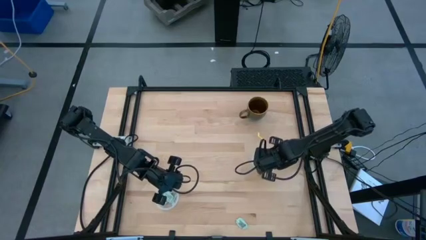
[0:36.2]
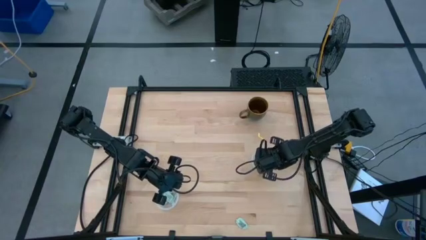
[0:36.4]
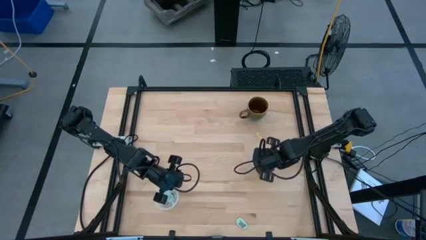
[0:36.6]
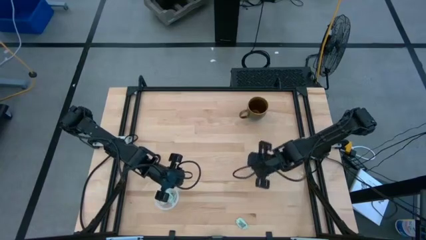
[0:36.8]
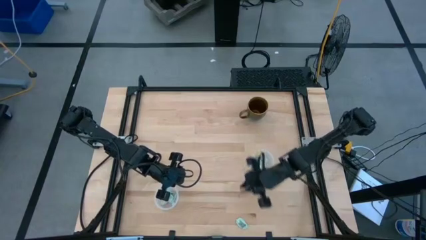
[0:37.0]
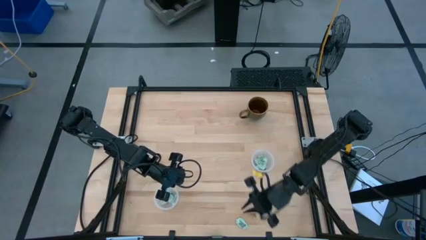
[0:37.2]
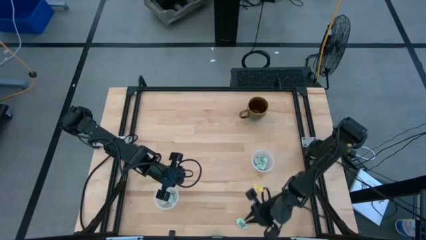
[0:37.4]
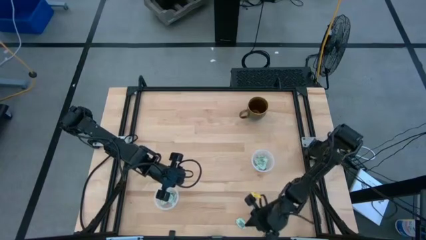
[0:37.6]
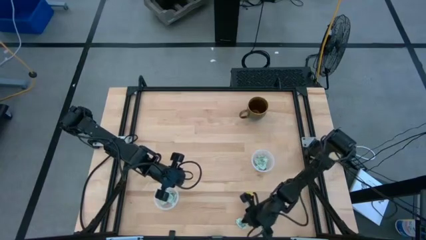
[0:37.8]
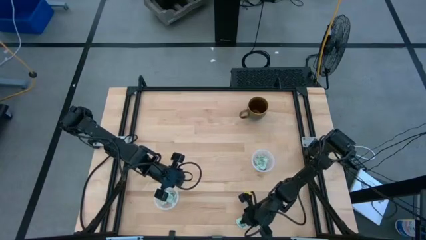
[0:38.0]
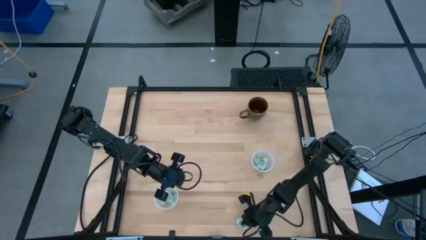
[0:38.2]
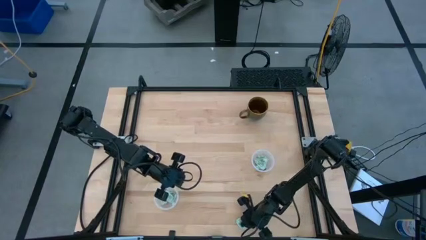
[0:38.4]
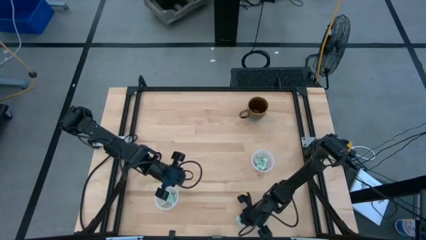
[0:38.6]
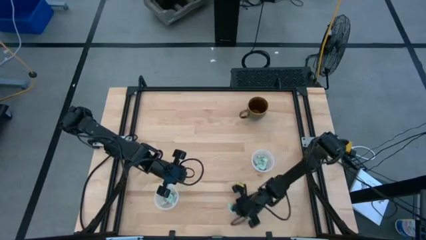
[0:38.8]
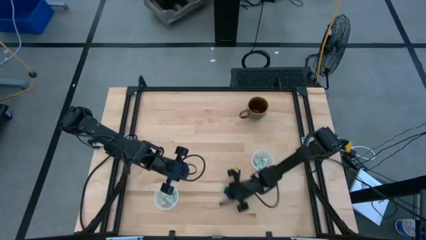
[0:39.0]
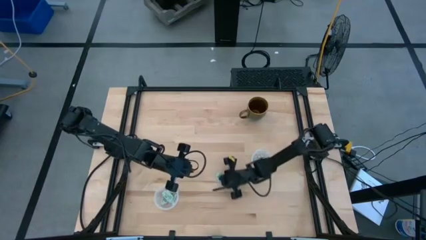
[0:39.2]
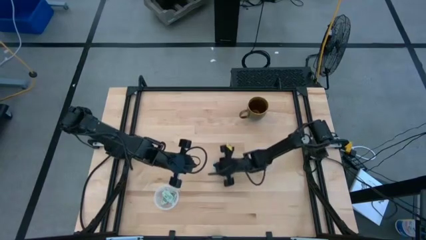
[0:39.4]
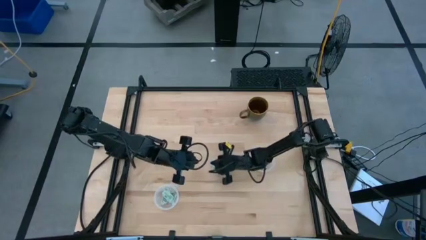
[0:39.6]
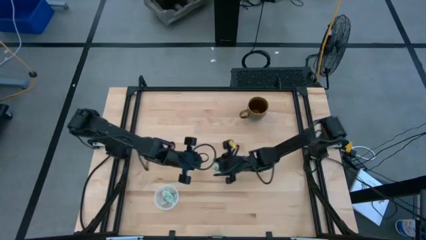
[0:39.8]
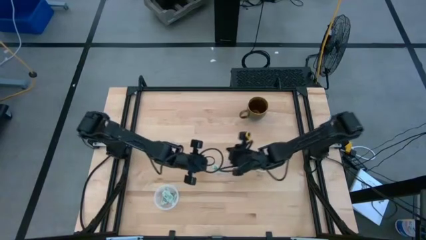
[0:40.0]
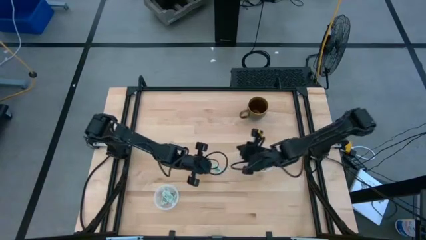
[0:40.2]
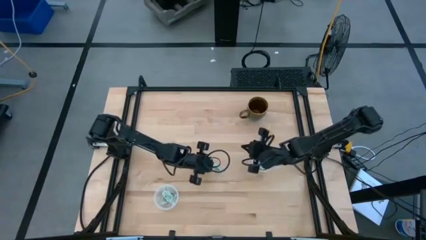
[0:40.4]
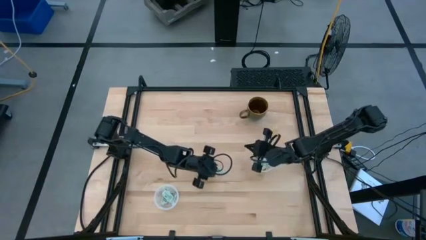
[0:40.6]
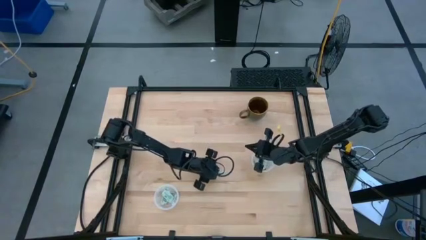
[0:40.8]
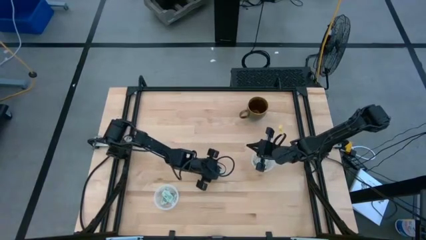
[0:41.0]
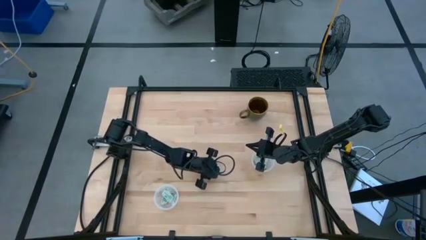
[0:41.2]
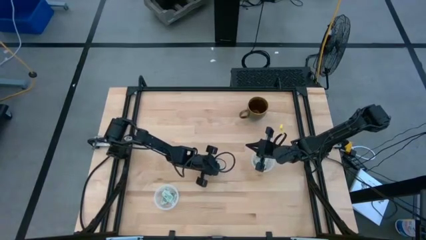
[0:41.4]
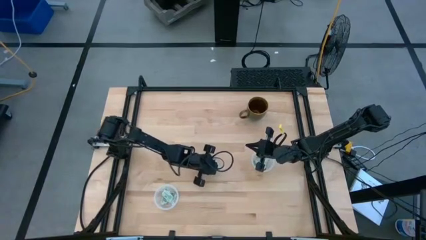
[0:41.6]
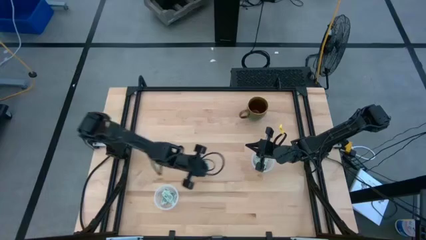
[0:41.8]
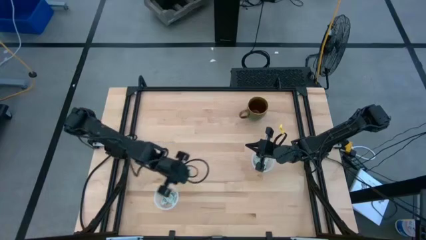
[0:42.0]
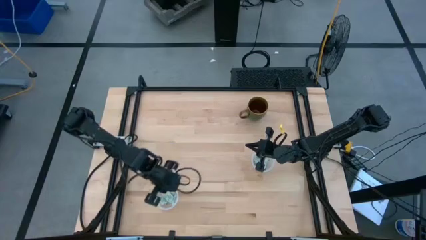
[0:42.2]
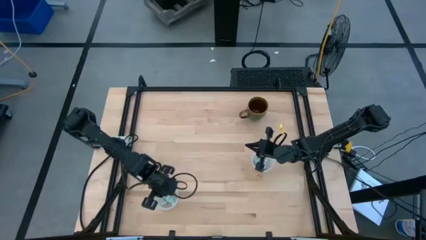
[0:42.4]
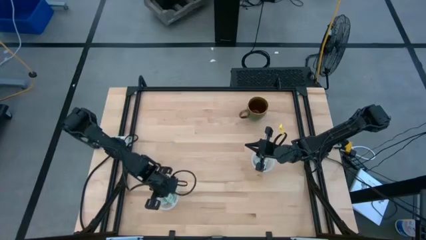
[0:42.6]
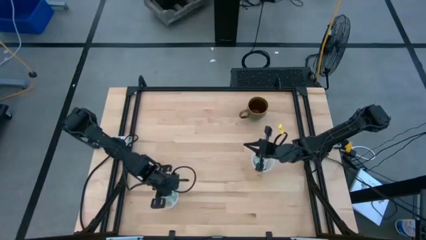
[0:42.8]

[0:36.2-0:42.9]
Task: Pick and place Stevia / Truvia into bins
Put the stevia packet into the bottom transparent container

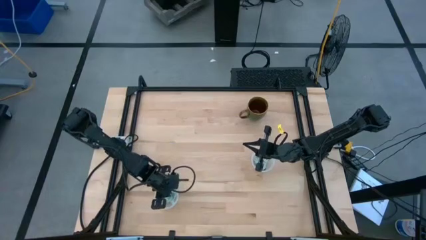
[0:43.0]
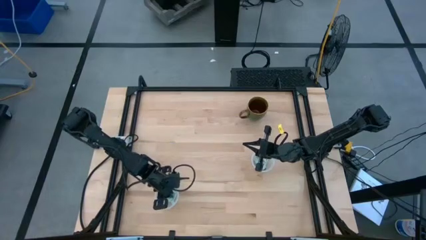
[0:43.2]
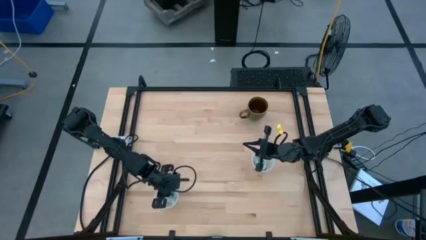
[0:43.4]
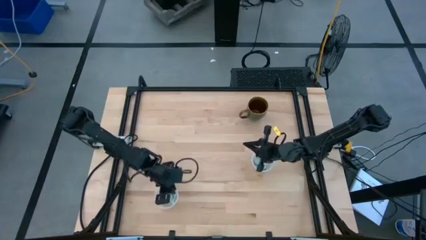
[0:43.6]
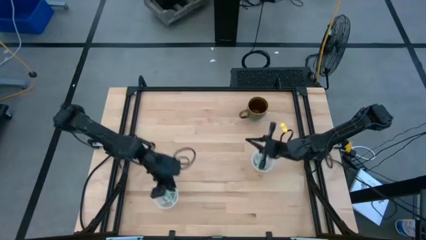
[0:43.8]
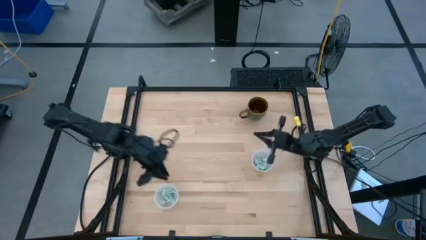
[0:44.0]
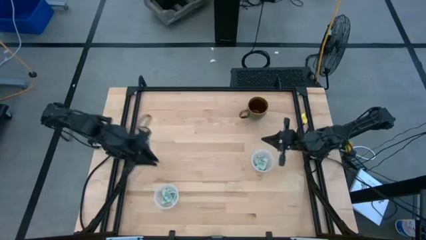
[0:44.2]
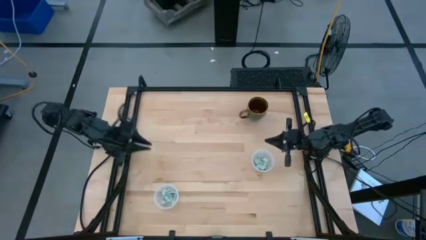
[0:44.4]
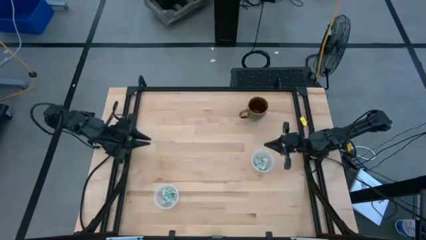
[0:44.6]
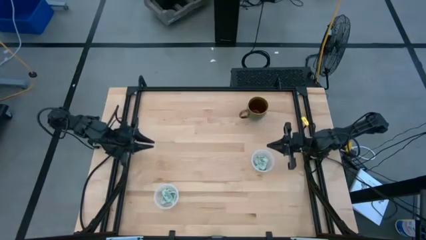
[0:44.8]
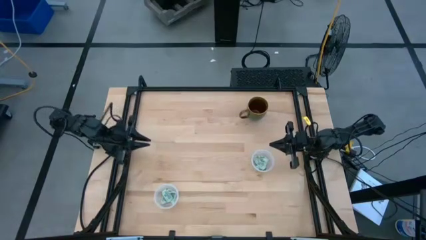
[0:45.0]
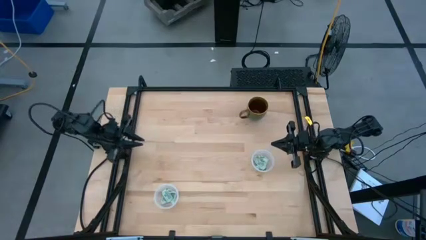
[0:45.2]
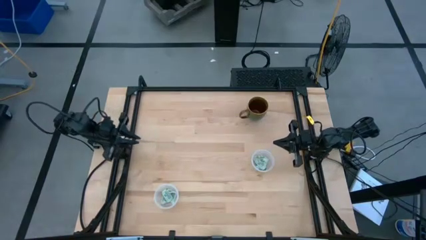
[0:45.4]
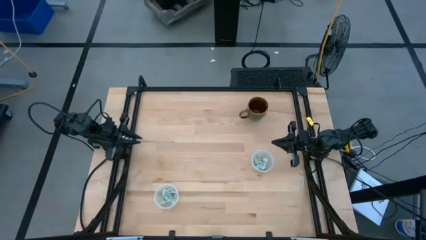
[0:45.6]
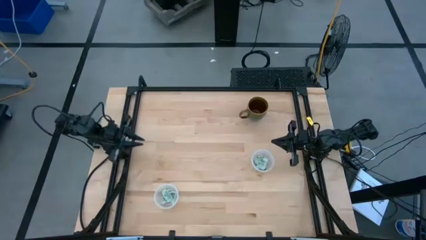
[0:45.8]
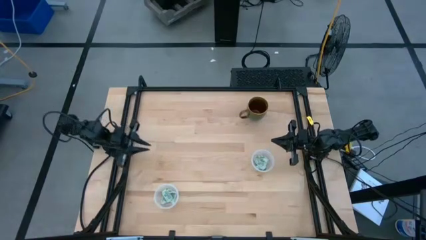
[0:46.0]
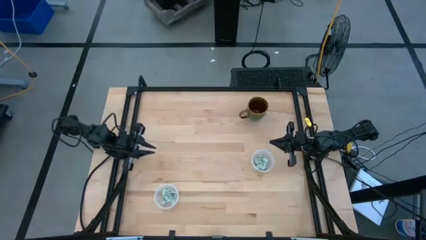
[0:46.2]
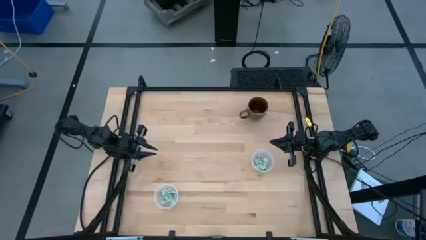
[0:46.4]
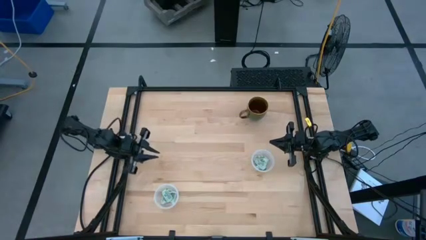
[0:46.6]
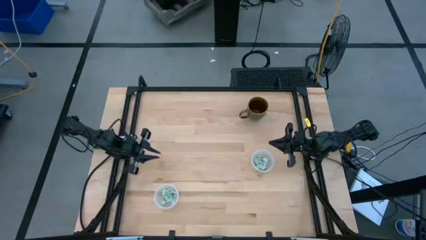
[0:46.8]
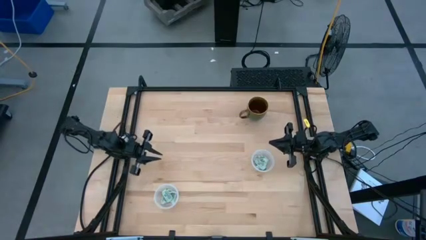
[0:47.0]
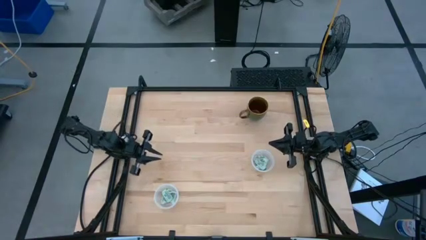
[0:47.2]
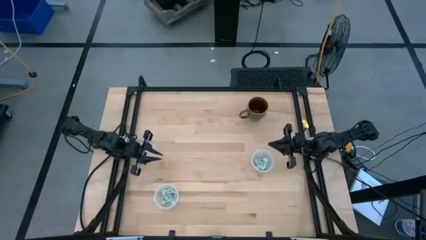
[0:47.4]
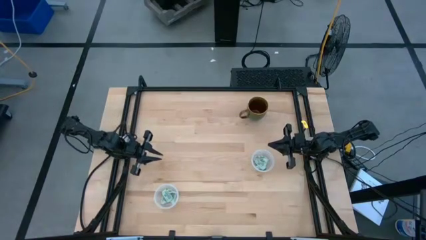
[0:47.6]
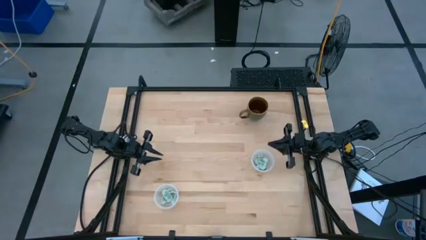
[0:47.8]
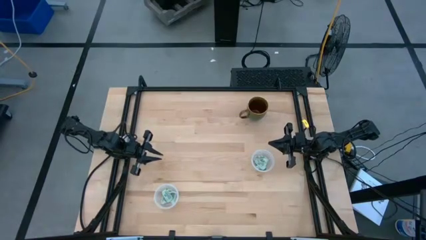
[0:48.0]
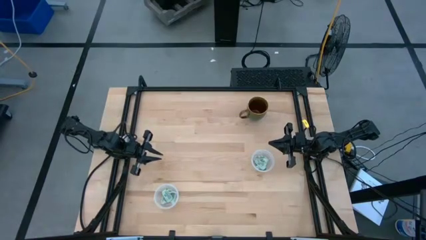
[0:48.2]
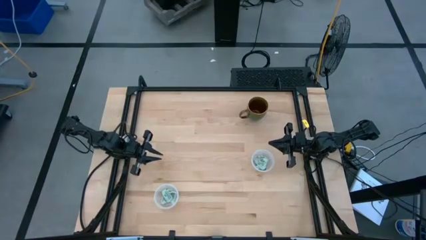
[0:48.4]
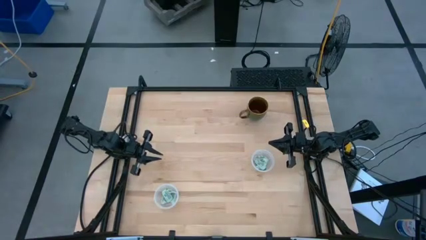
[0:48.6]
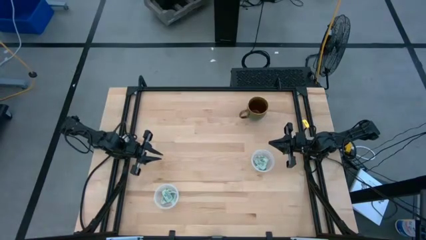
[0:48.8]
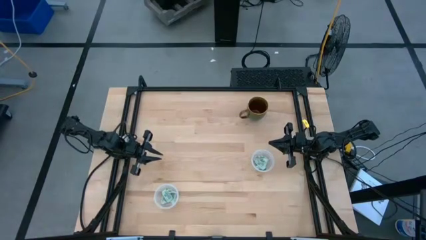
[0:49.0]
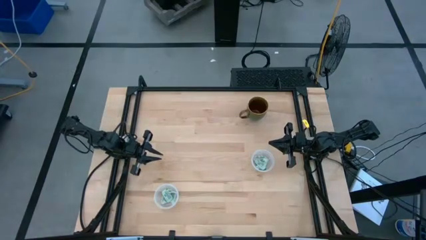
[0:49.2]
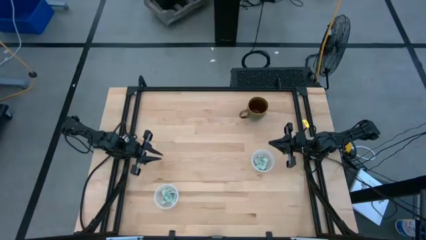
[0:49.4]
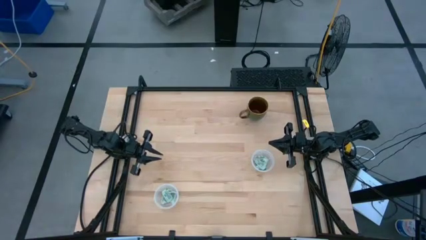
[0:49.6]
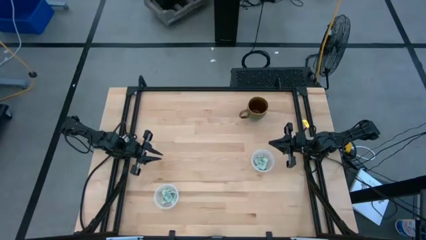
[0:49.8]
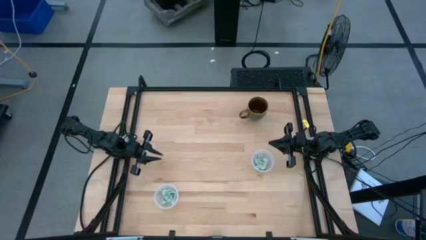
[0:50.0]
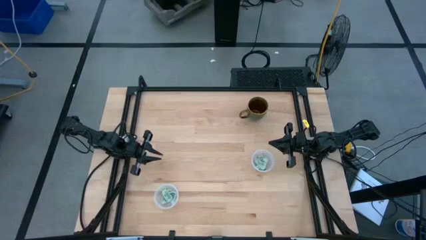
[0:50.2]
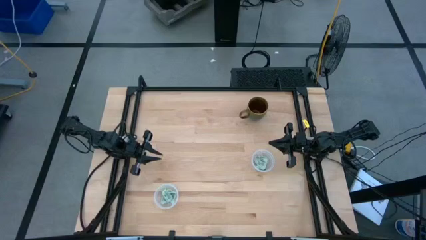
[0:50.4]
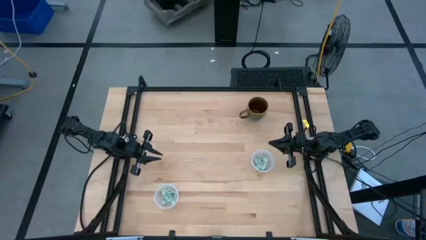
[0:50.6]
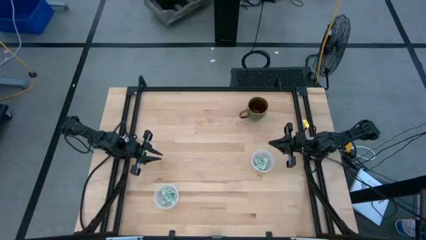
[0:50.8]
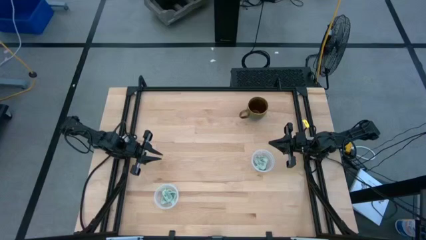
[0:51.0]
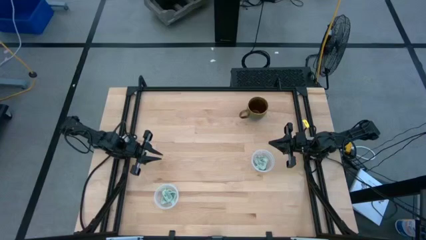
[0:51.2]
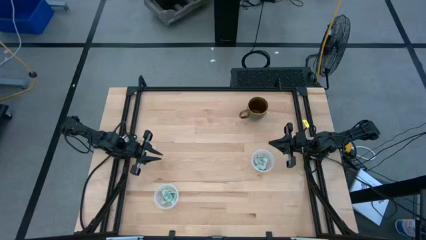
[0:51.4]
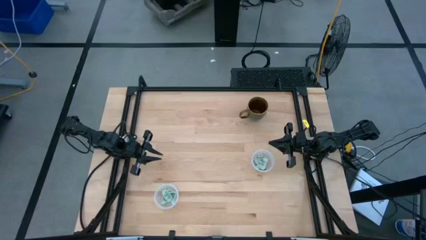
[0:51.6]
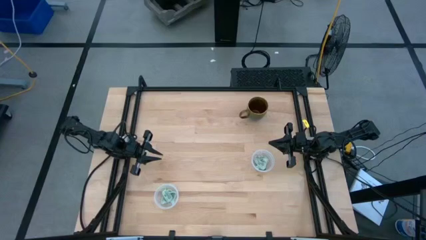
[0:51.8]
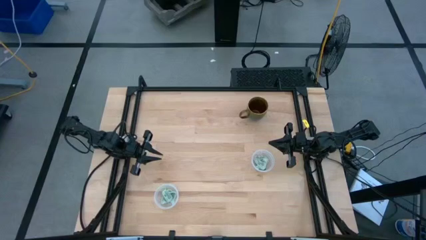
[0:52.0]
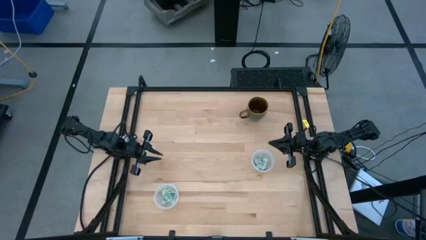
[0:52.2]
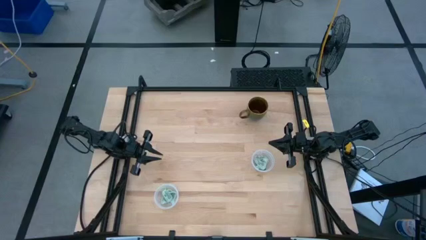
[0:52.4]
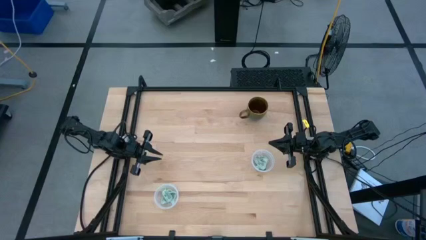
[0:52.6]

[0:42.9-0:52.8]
Return to Home Position
